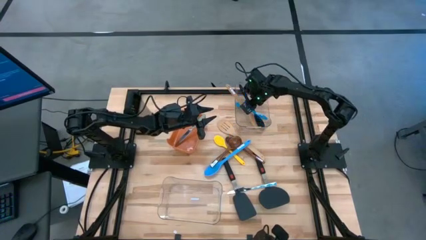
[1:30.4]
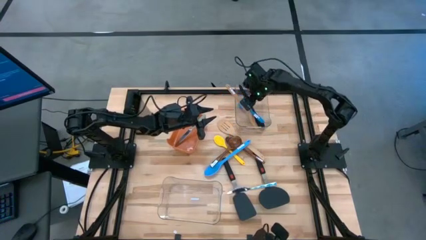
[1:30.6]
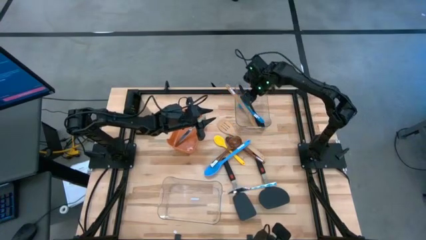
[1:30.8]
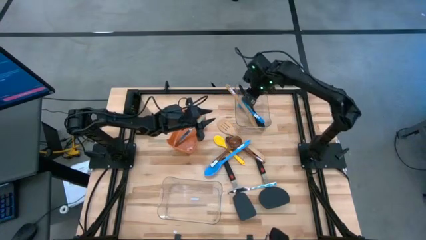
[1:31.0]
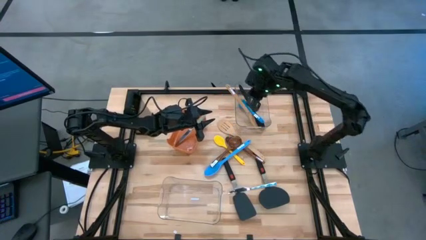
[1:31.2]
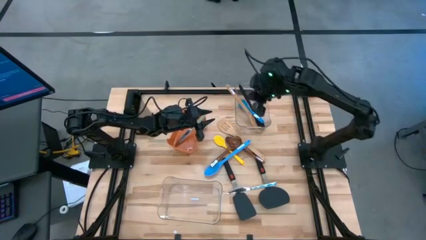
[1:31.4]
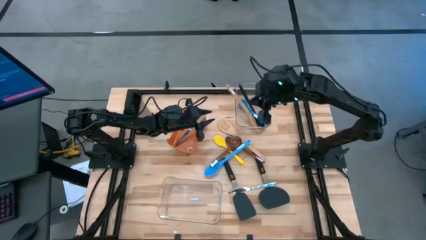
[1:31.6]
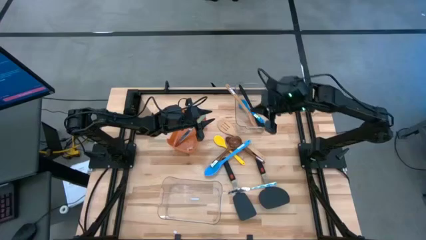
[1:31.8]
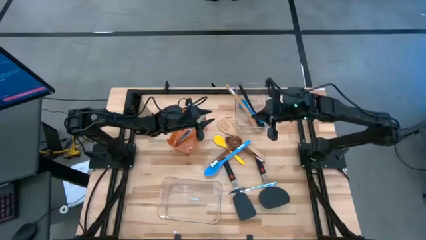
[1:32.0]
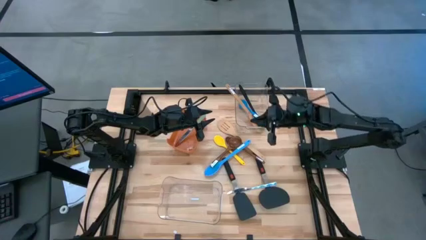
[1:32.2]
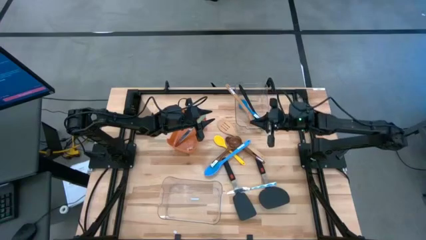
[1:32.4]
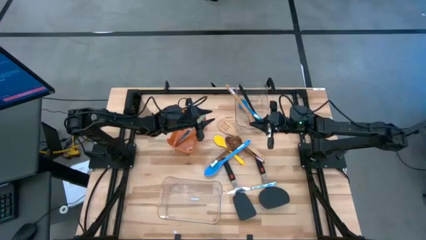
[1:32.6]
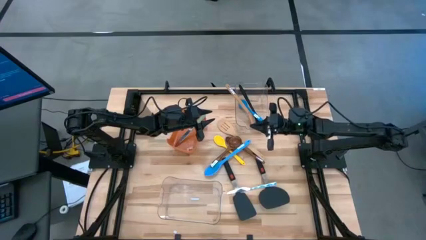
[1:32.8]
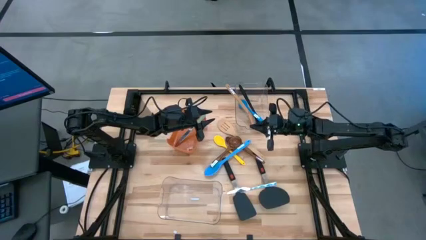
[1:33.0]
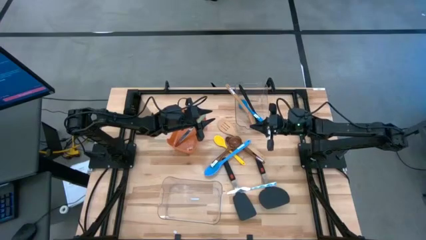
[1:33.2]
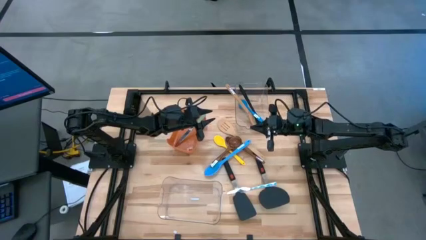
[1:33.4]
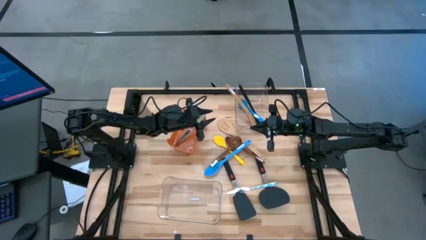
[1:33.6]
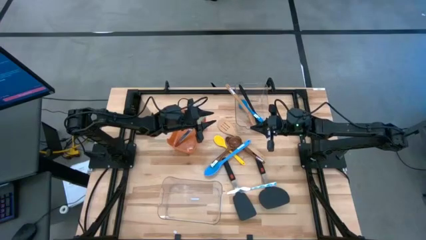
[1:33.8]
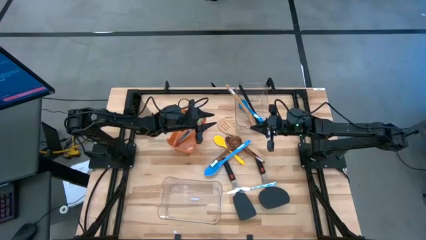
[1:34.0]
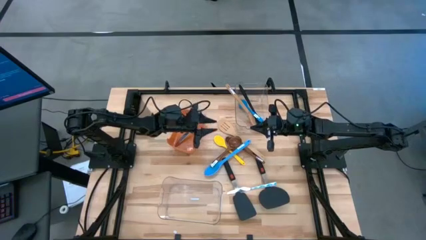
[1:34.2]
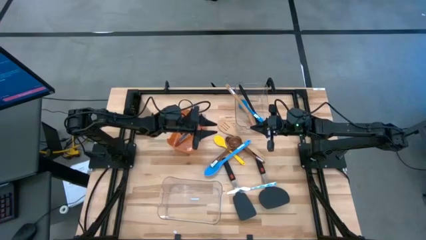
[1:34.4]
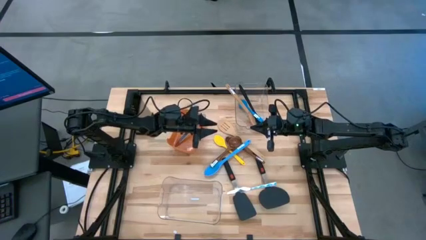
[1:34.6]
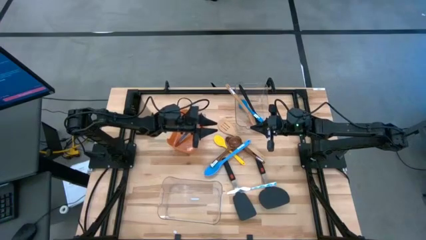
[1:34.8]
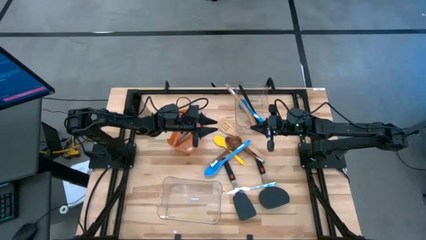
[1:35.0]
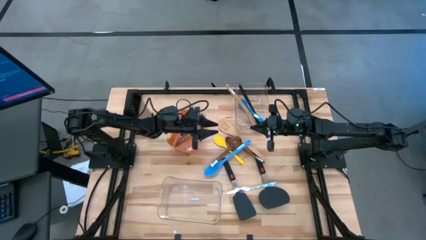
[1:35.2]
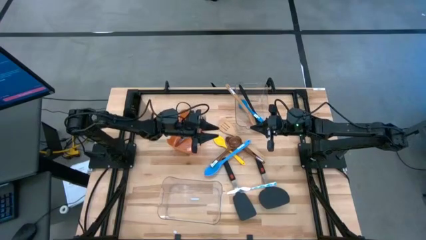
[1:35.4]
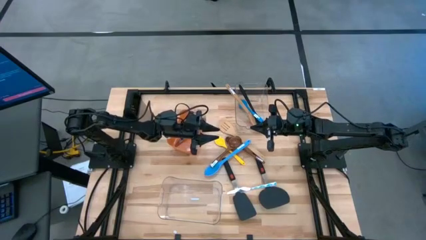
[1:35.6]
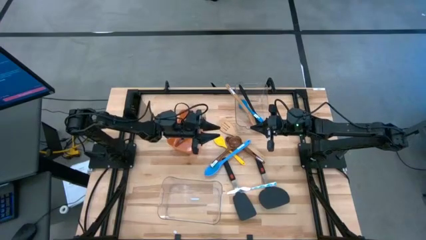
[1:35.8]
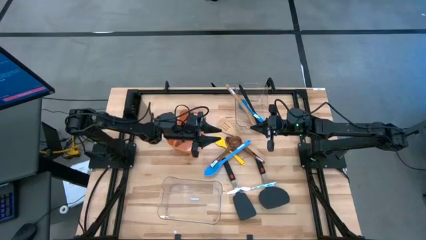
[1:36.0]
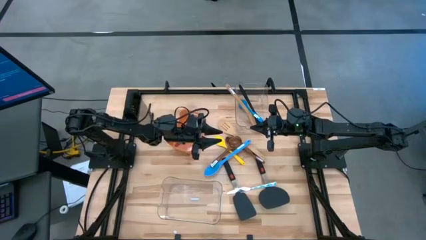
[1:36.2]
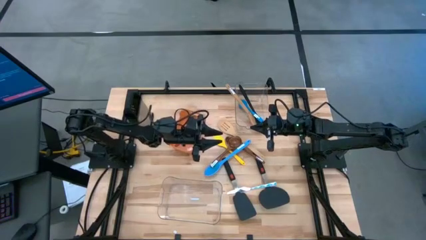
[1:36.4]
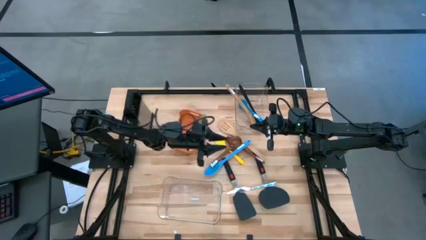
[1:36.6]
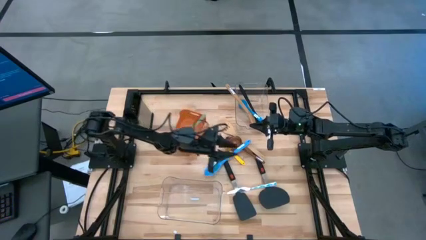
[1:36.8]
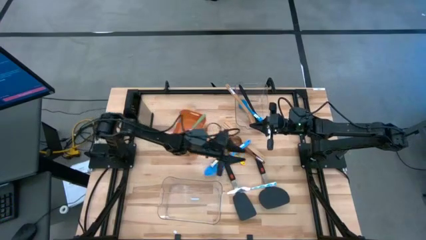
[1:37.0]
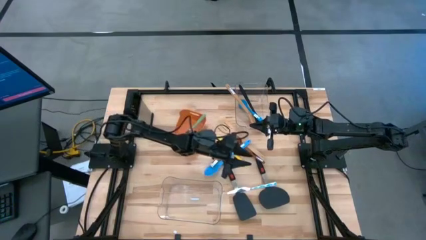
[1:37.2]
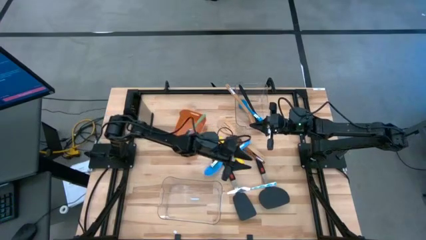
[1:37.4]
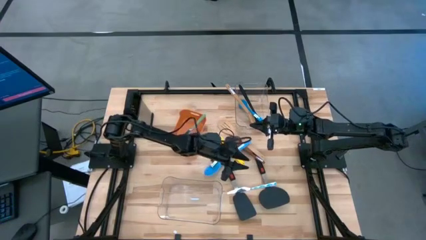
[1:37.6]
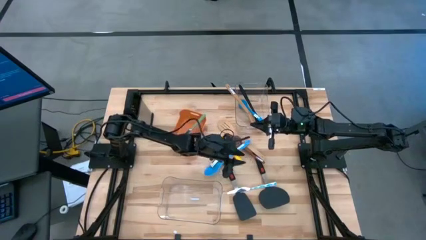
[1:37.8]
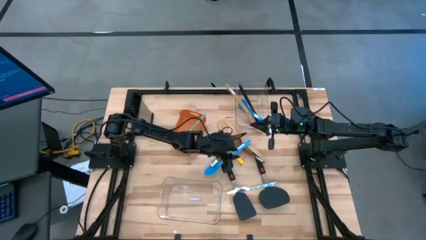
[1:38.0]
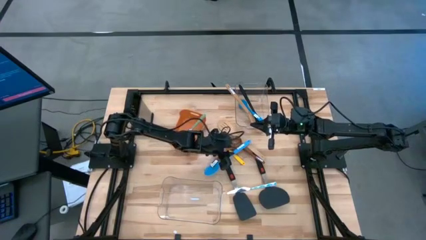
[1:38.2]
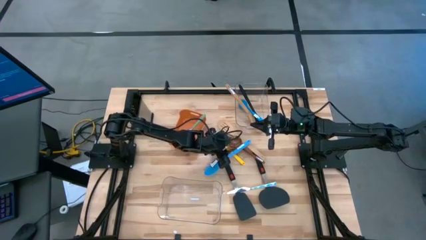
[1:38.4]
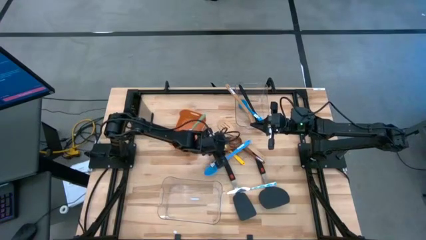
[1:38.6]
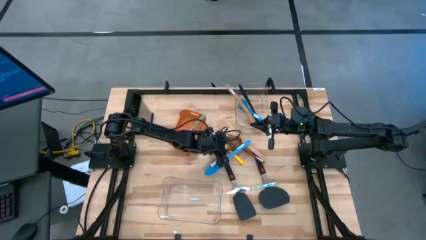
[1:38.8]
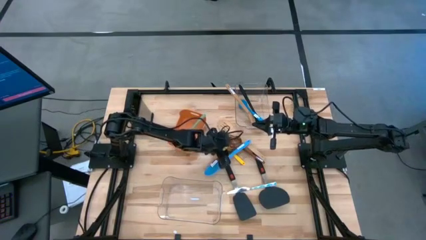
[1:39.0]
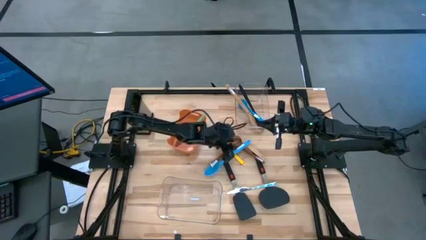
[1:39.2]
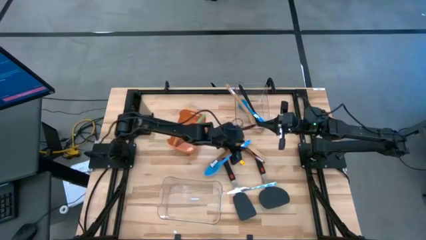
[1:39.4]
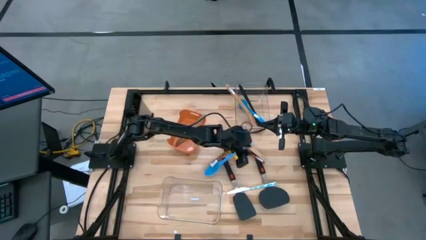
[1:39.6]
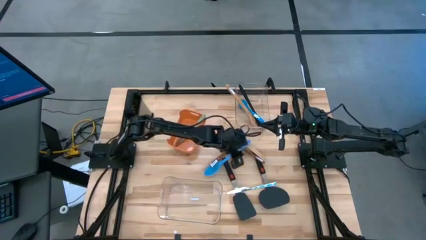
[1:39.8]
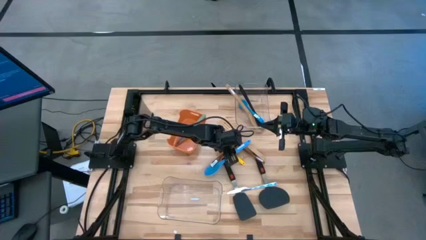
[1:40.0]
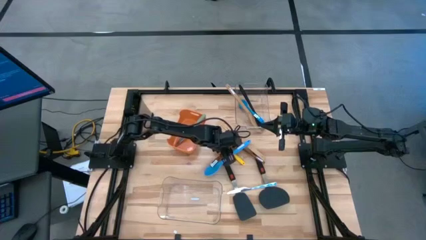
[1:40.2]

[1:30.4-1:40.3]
Task: Pick & Place Kitchen Items
Put the dark brown serving spoon into the top transparent bin
